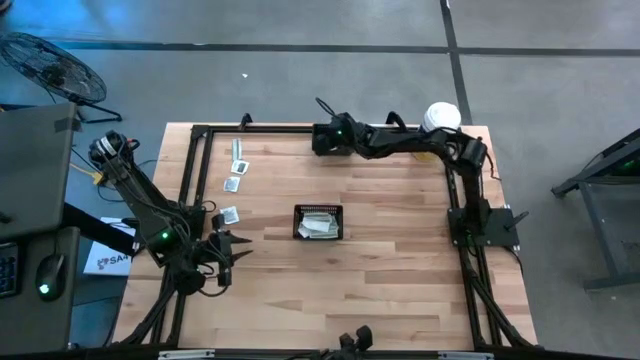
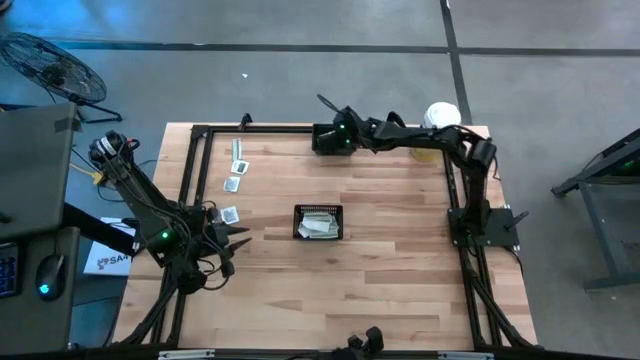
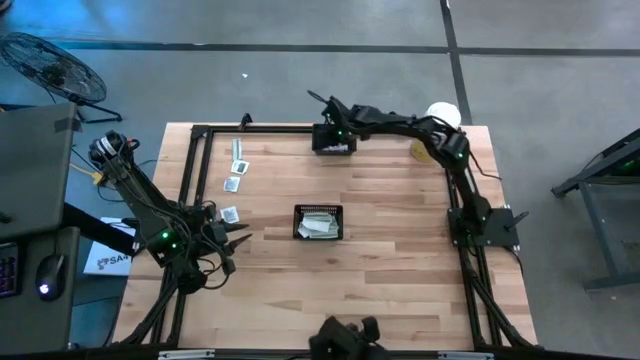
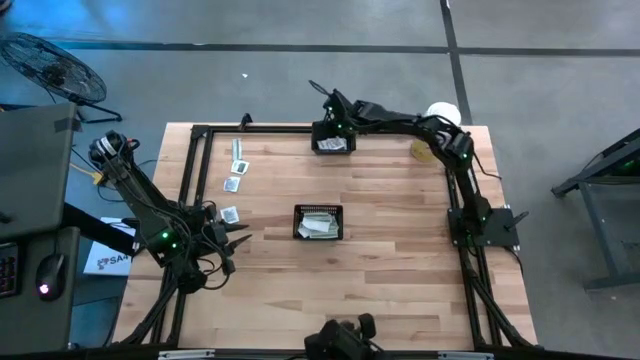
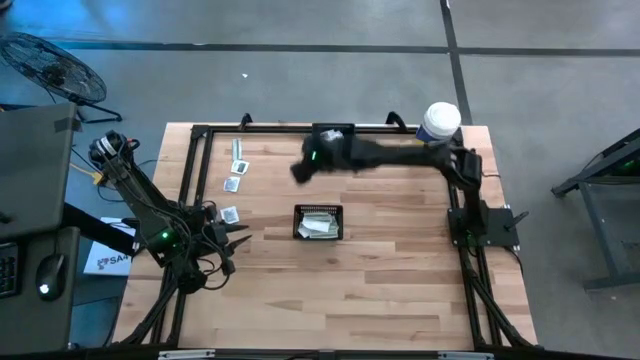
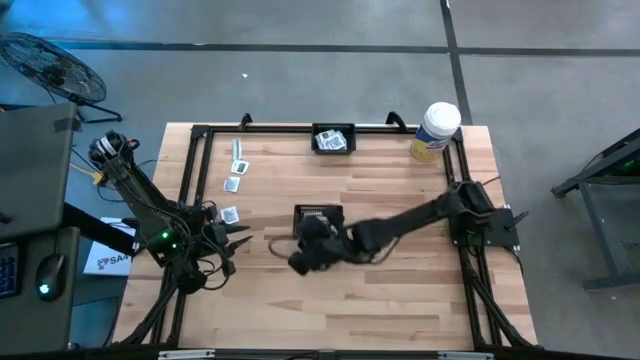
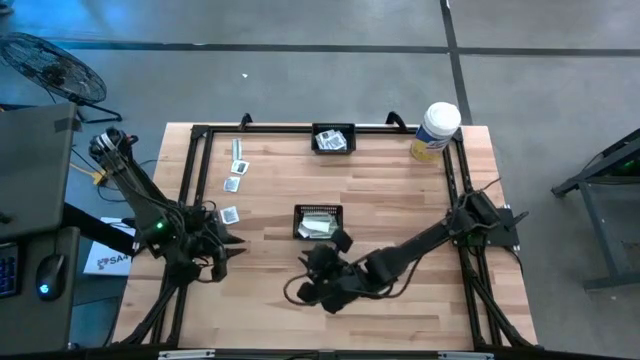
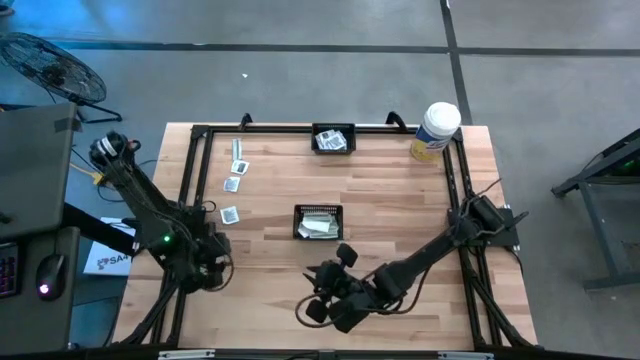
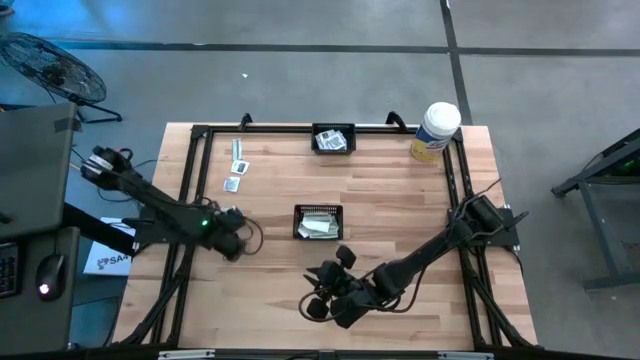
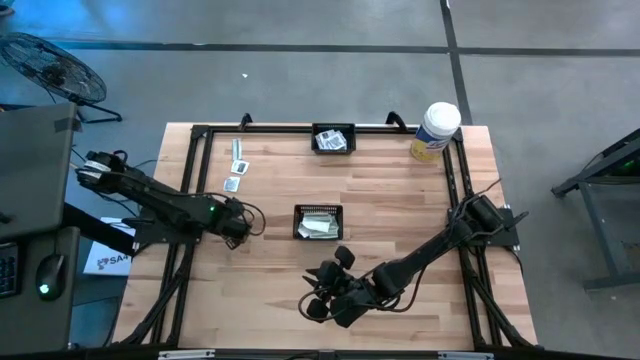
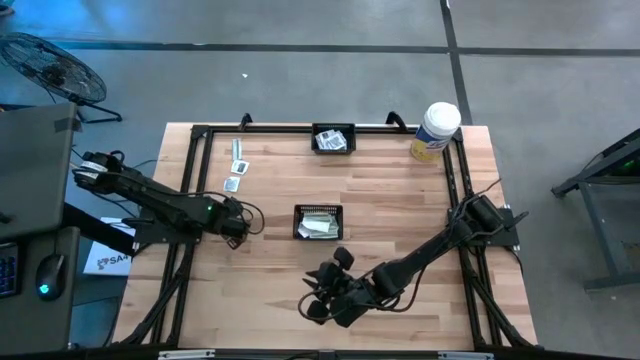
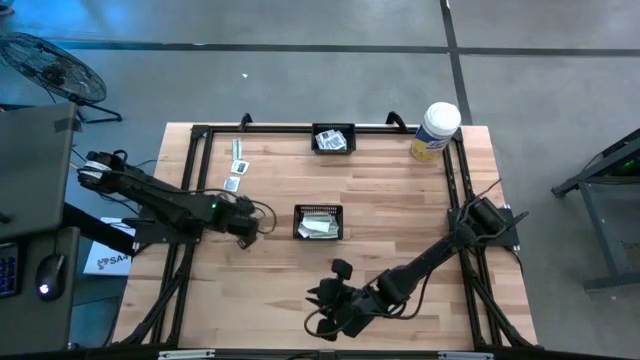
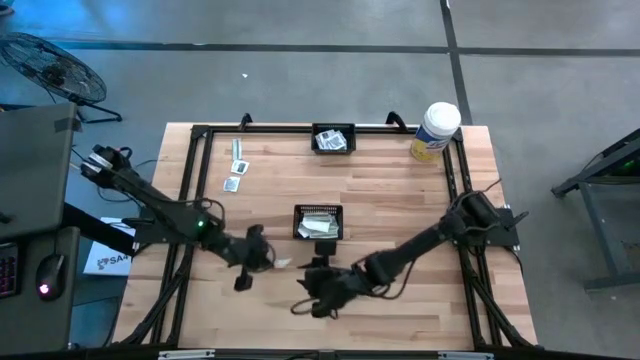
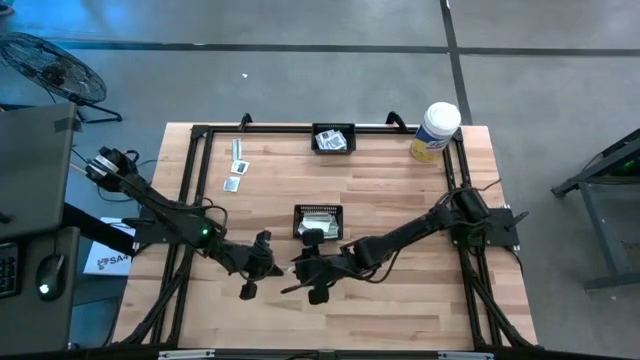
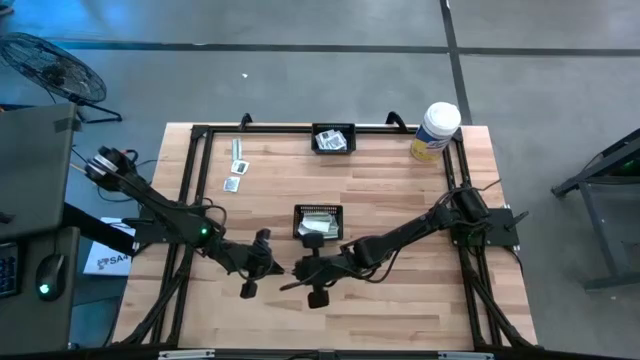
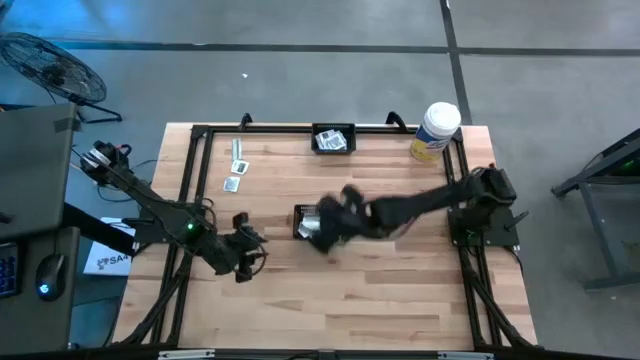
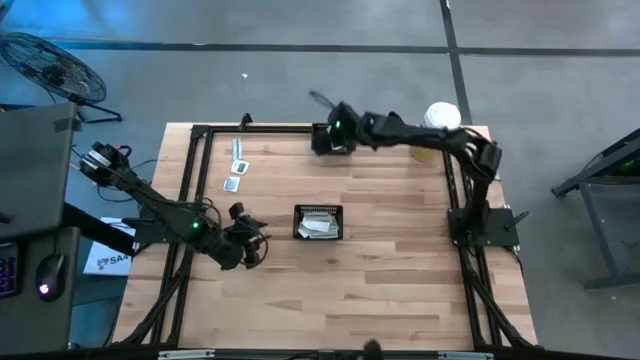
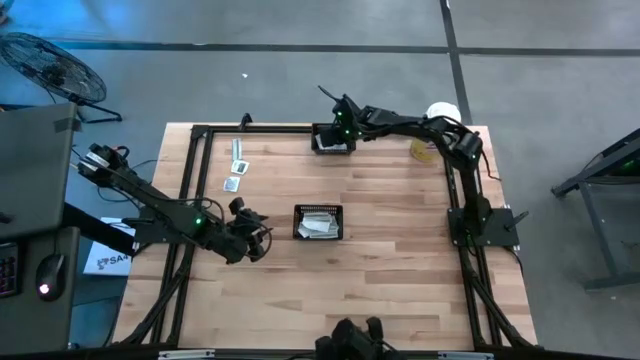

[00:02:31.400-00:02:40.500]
Task: Pick & Place First Aid Supplies
Put the towelette pack into the top black basket

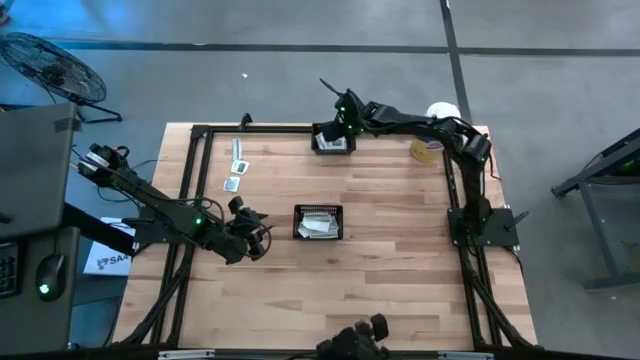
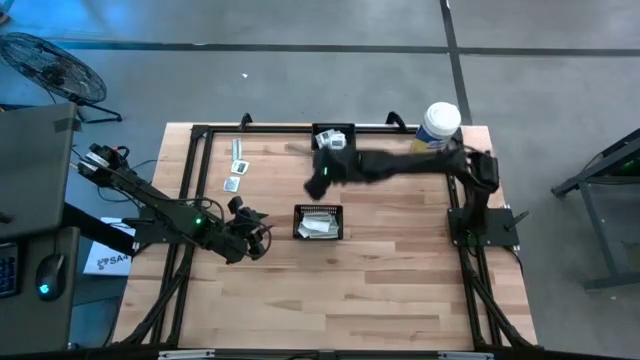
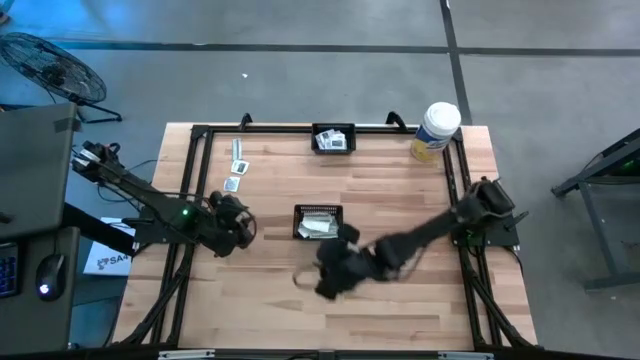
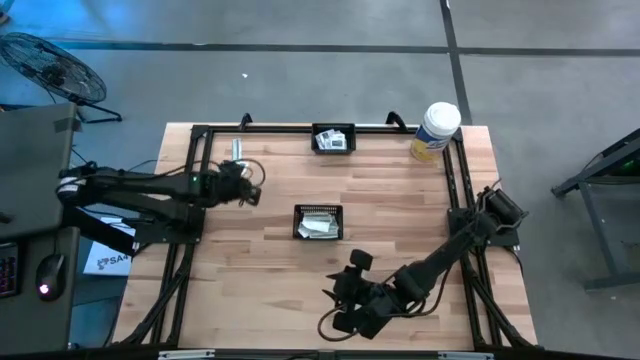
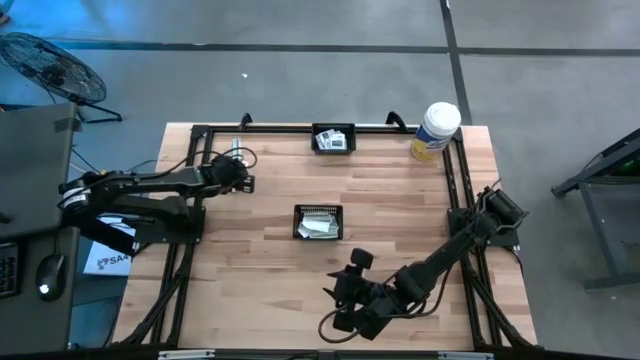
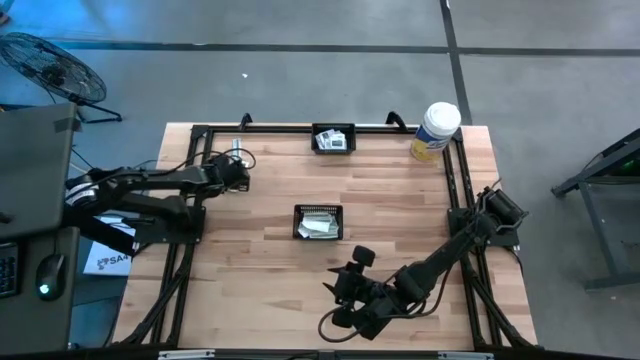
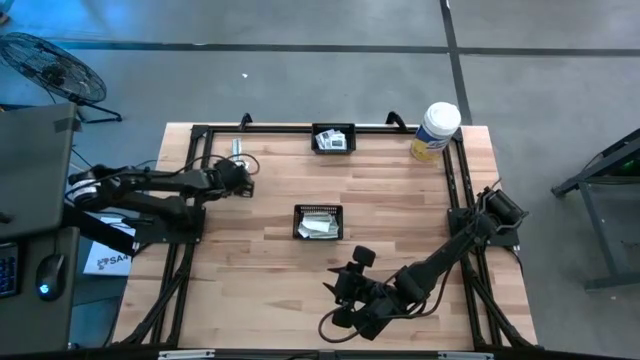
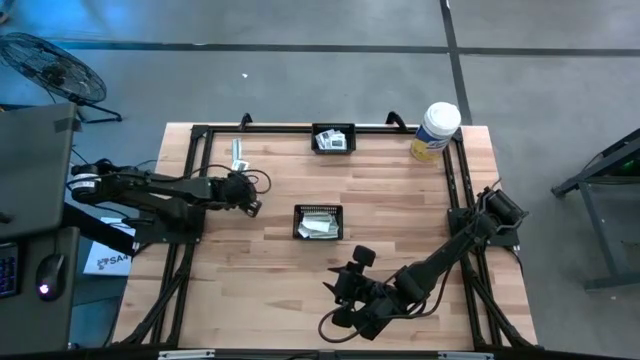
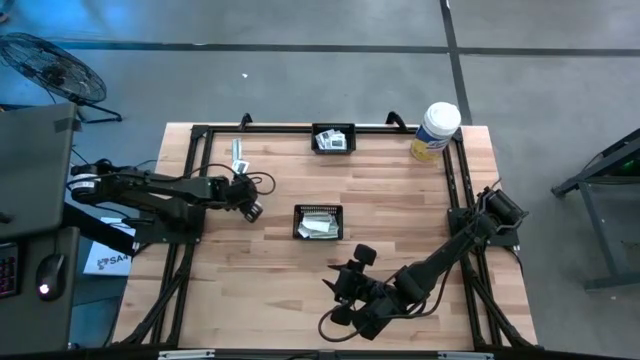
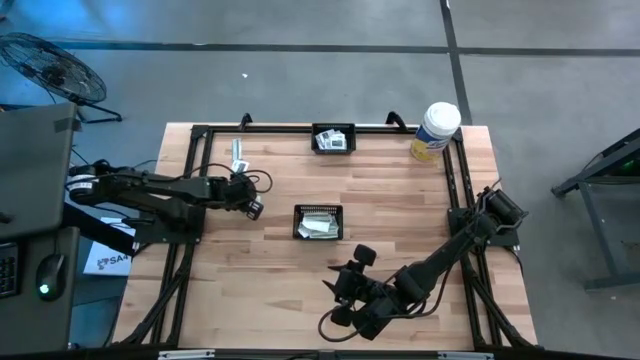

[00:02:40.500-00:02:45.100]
Put the towelette pack into the top black basket

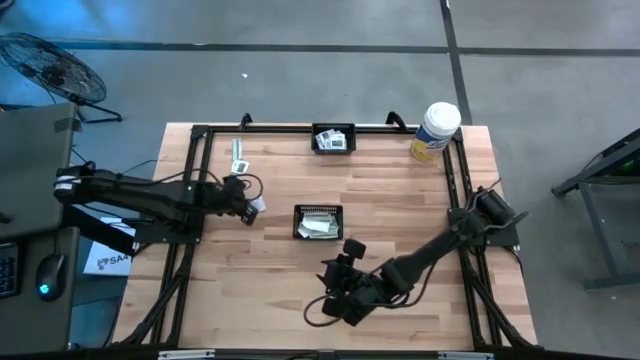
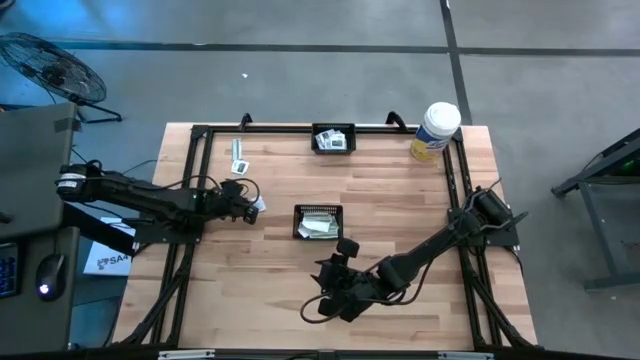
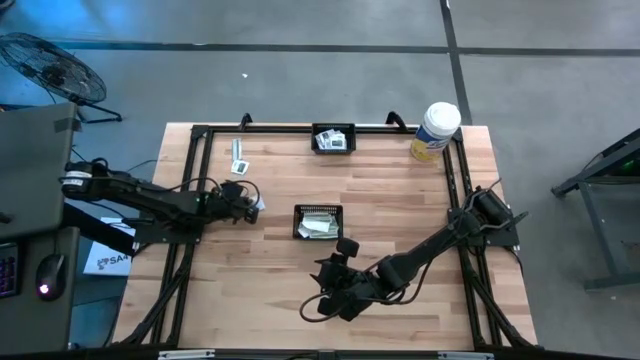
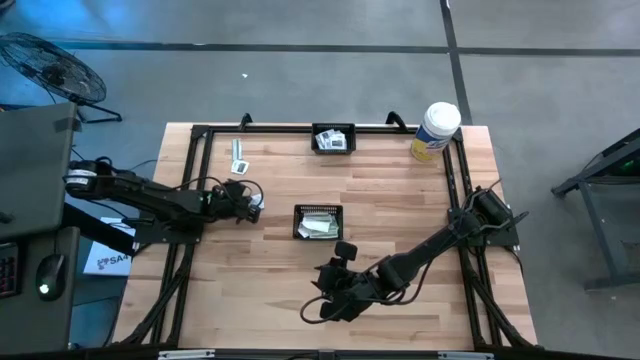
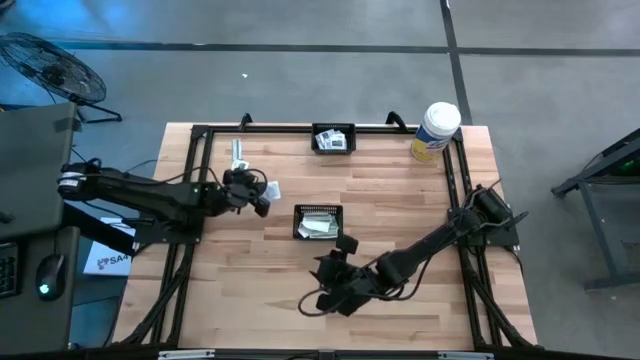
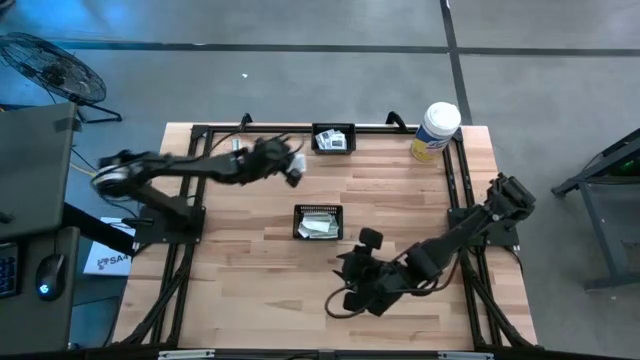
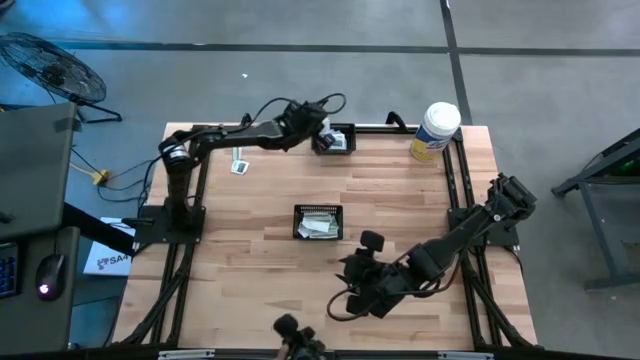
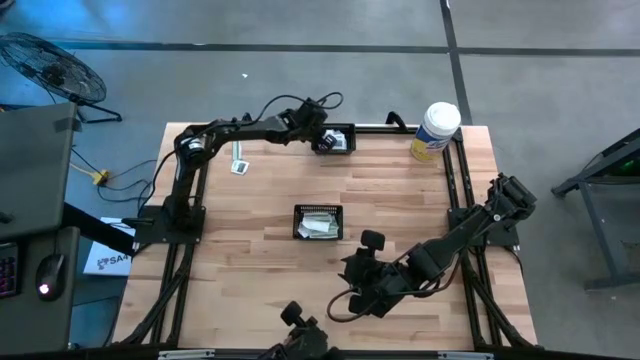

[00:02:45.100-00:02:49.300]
Put the towelette pack into the top black basket

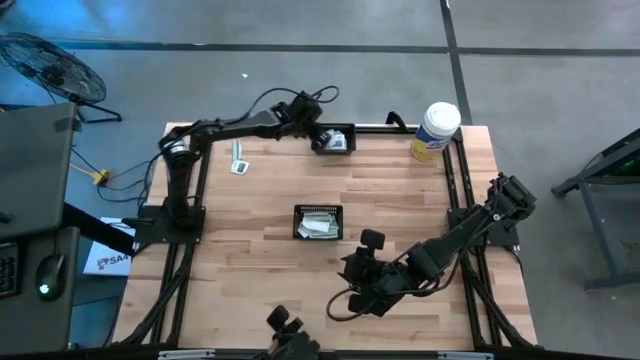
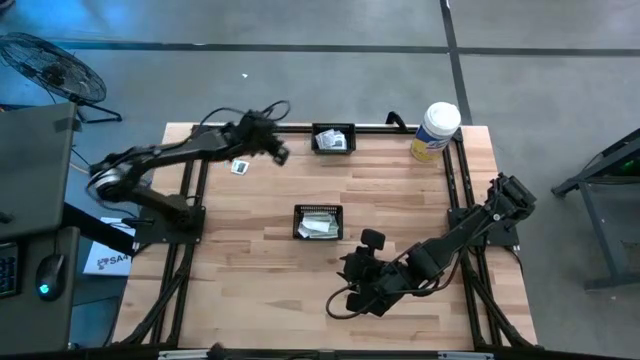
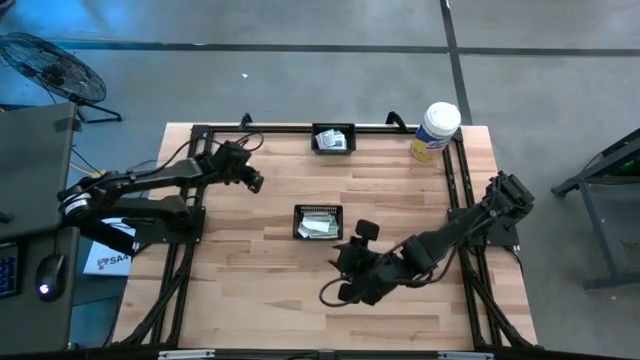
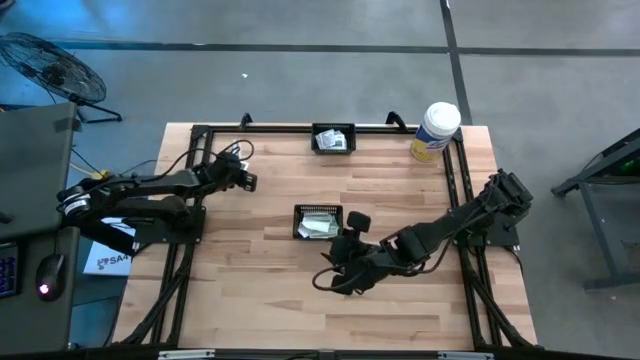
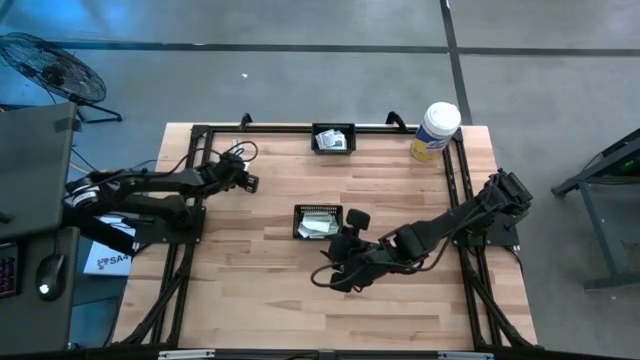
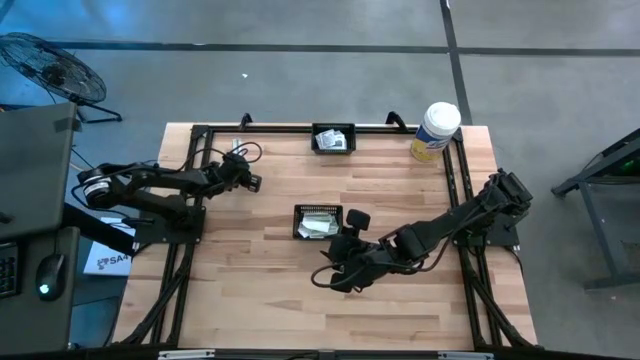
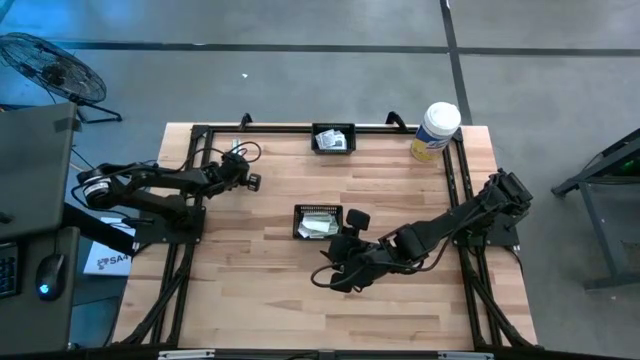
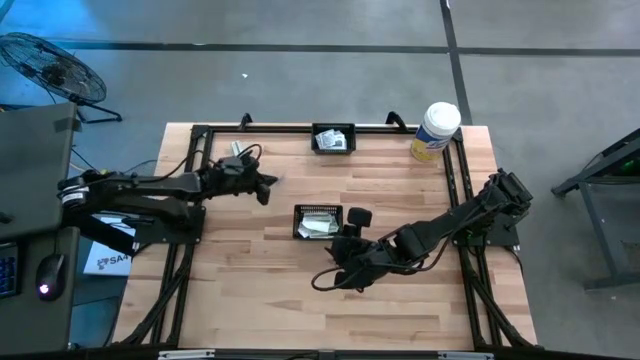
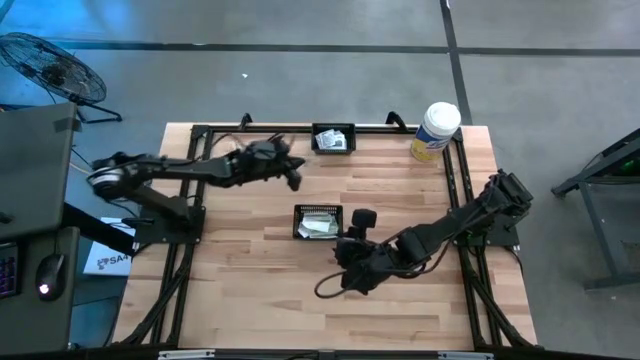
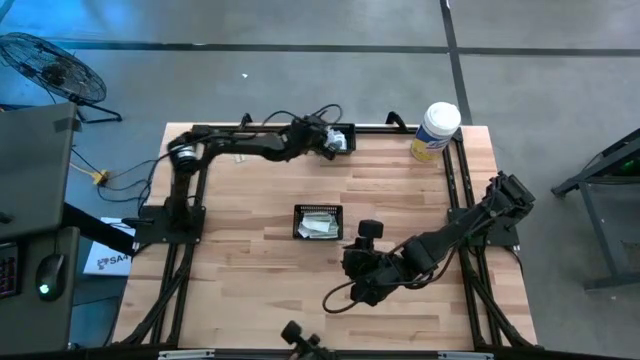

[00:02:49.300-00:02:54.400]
Put the towelette pack into the top black basket
